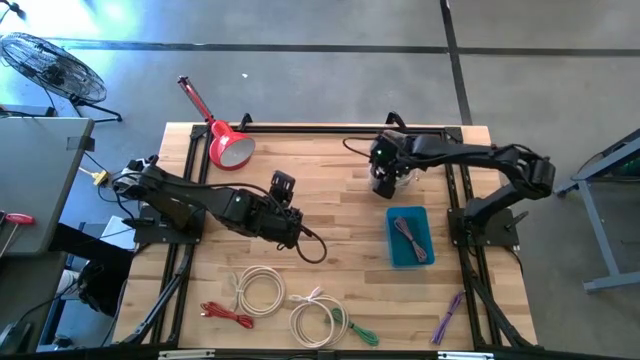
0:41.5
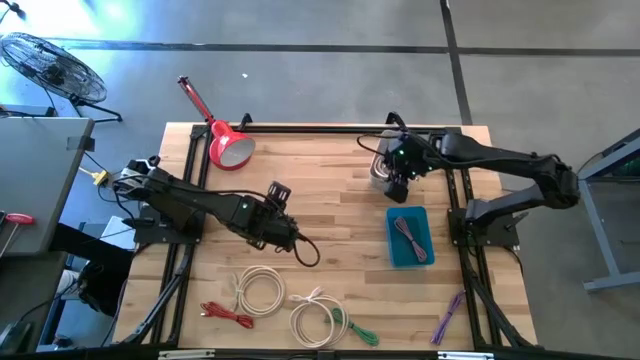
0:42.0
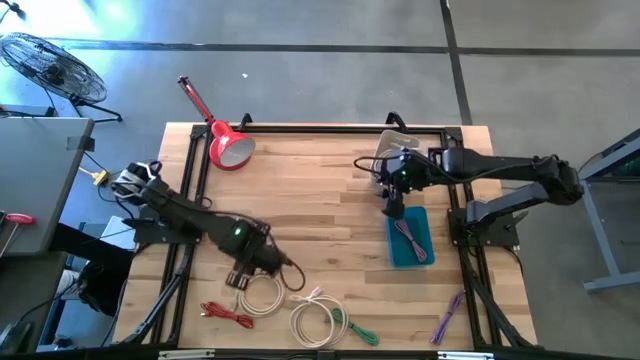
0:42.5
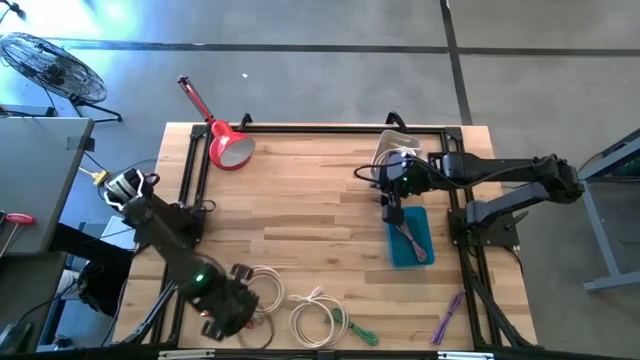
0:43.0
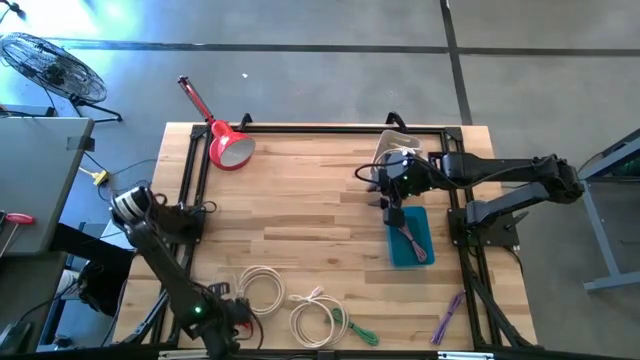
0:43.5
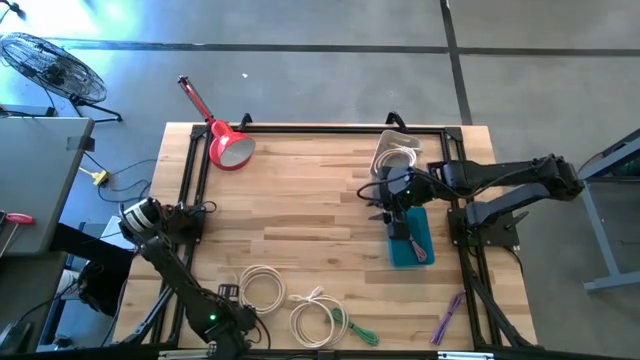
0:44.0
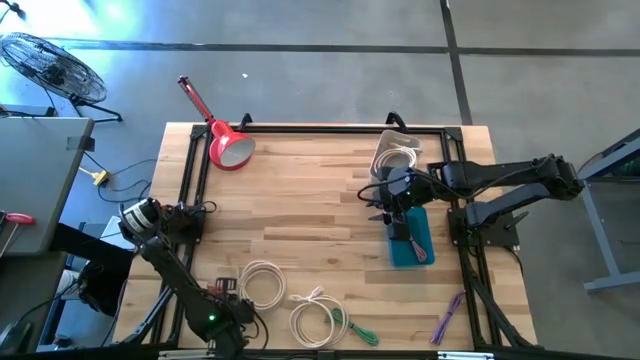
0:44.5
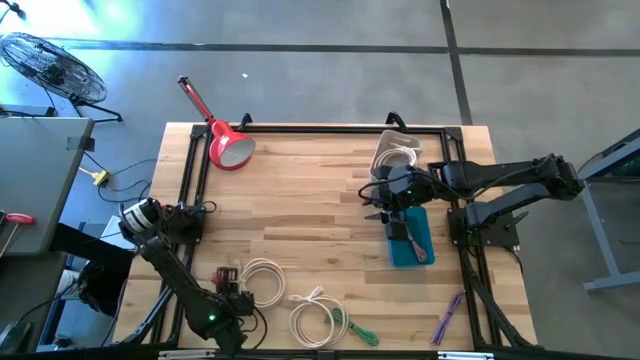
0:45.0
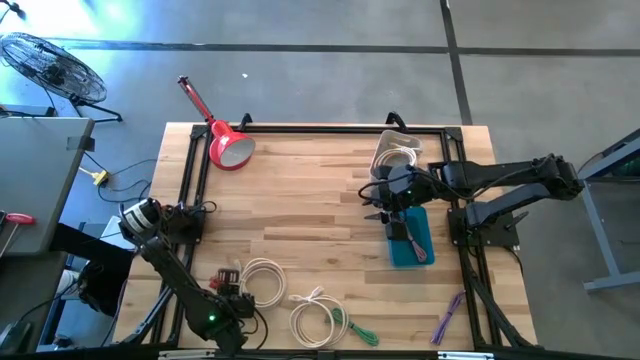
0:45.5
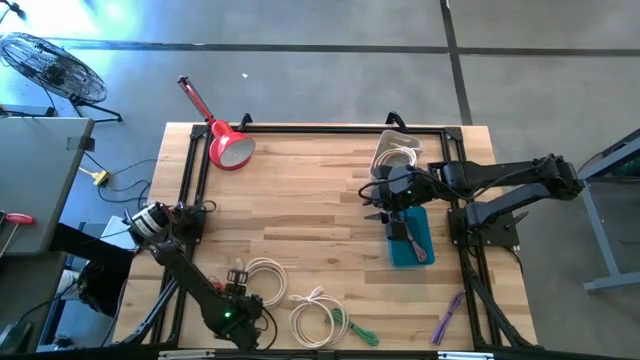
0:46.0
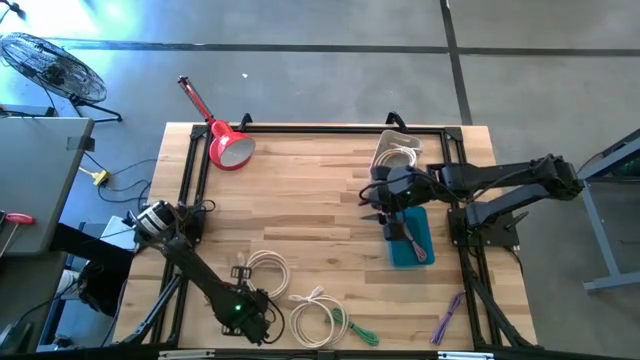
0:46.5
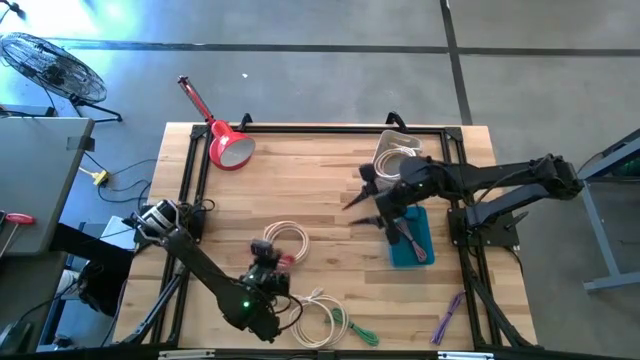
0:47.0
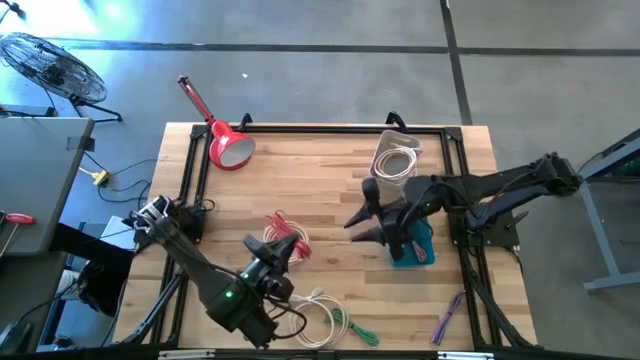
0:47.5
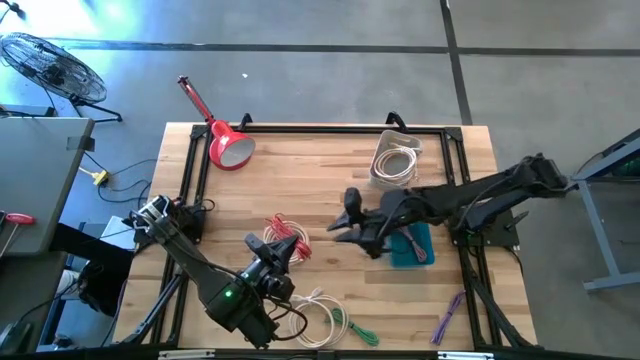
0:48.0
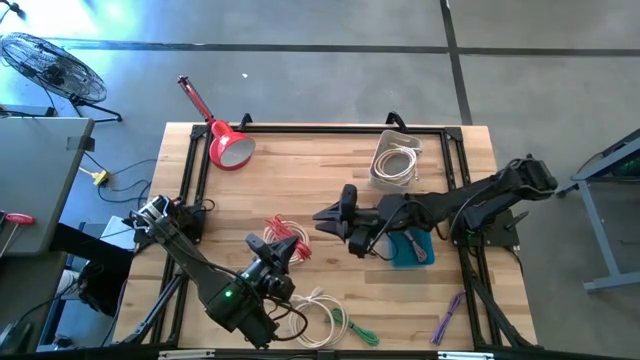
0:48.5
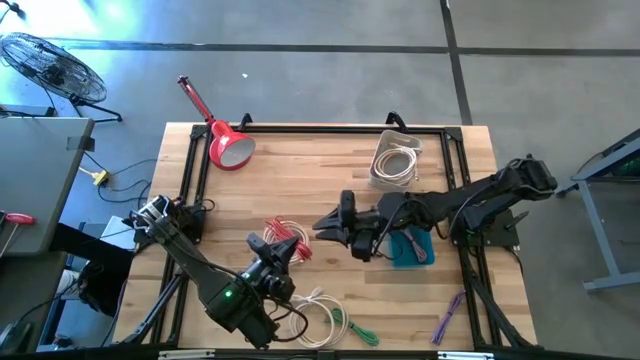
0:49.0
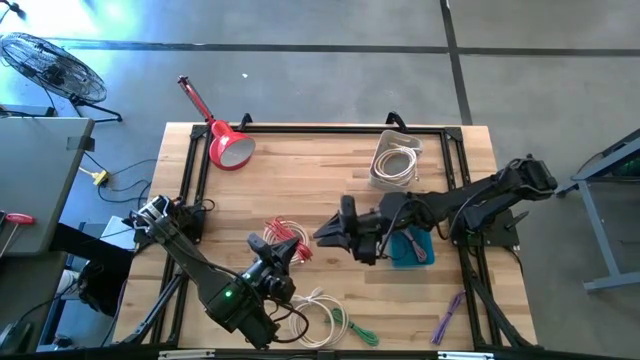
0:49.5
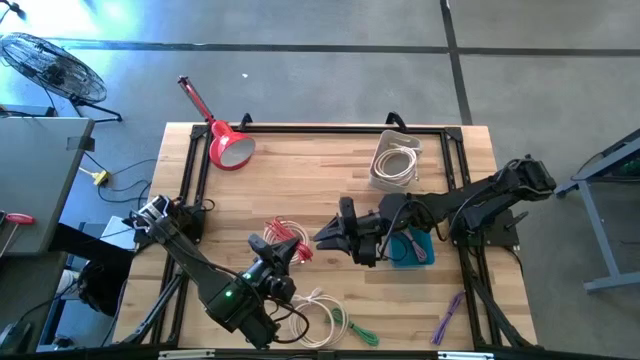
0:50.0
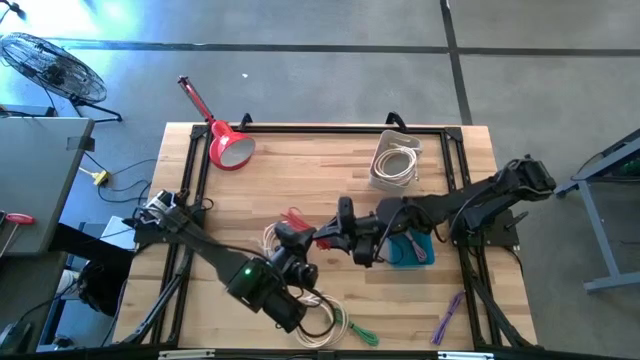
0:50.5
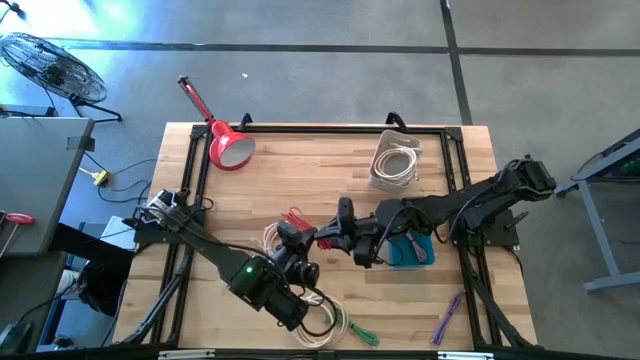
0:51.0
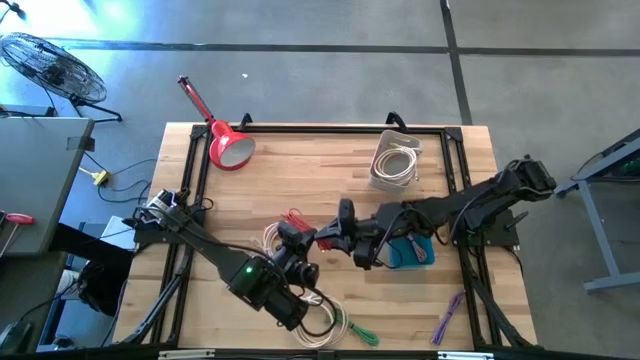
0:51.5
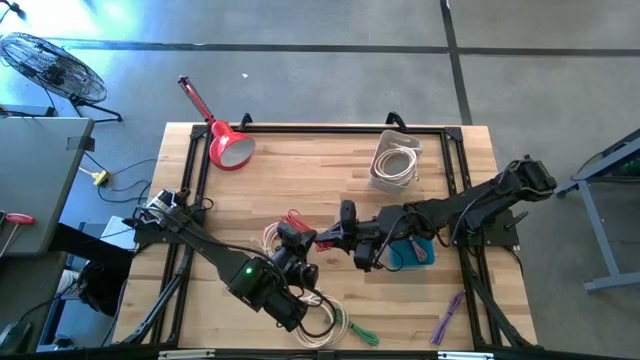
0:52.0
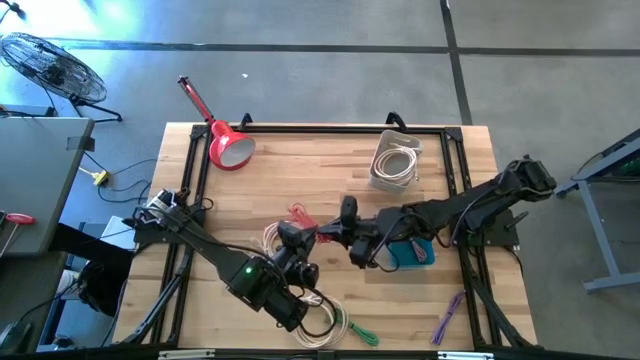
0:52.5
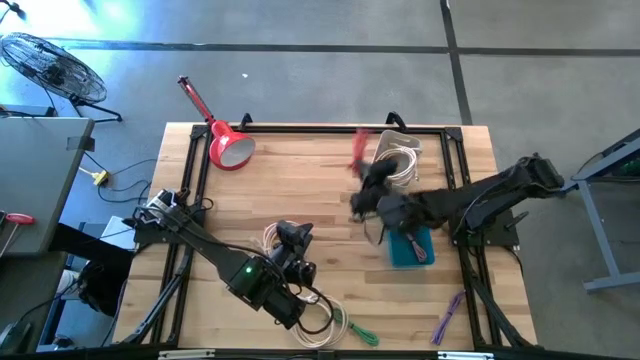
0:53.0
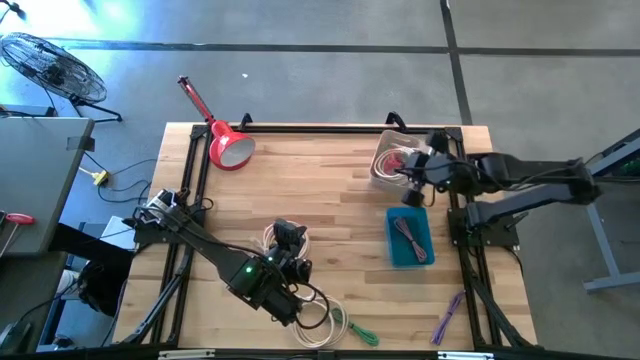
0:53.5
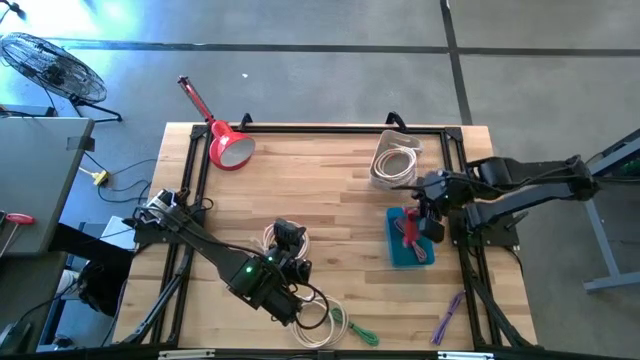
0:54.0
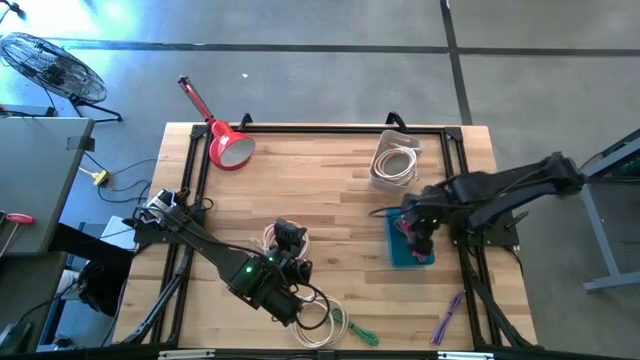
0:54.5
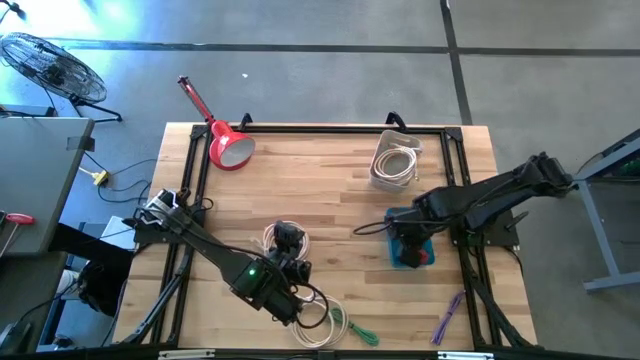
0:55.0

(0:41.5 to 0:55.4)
Task: Pick & Place USB Port
Put the red charger cable into the blue bin

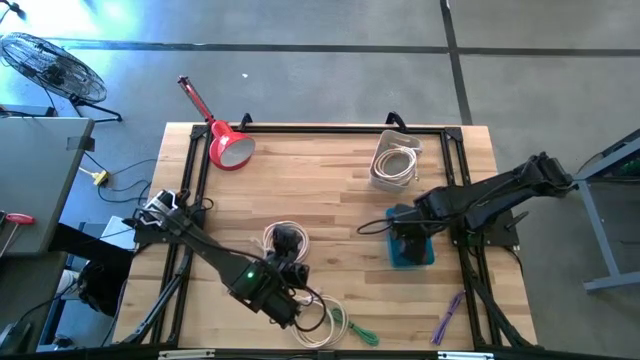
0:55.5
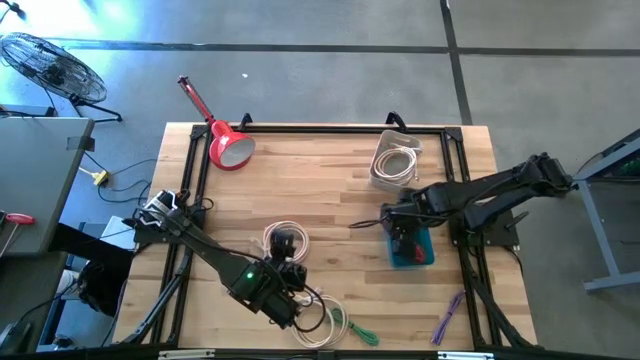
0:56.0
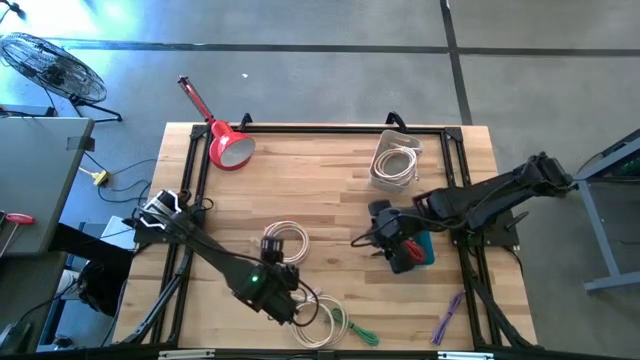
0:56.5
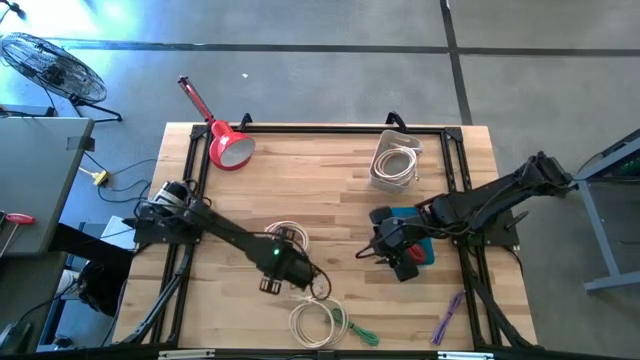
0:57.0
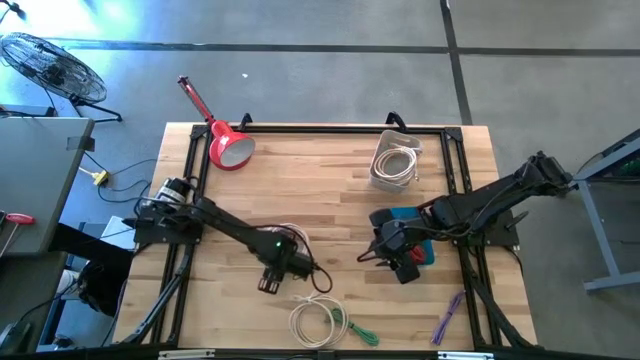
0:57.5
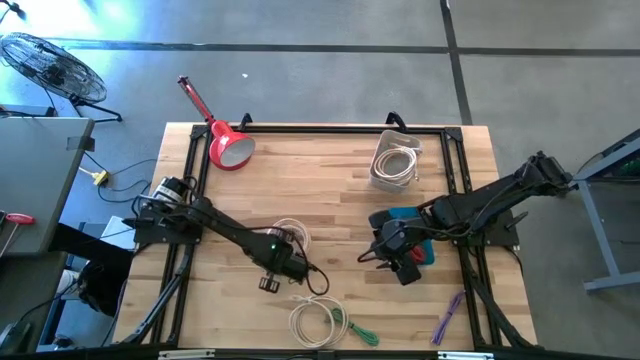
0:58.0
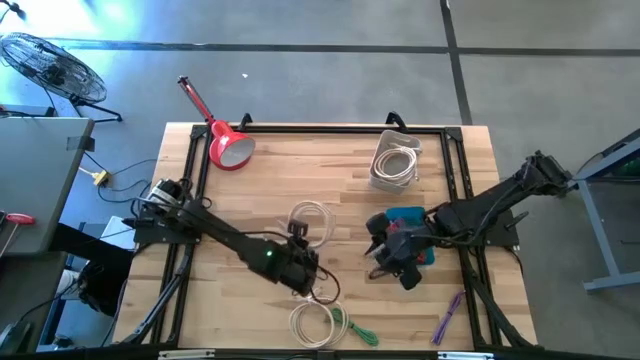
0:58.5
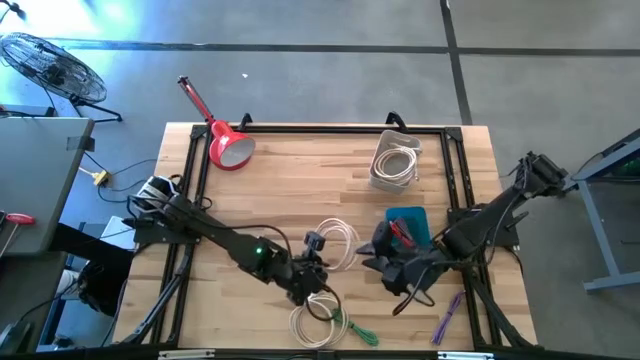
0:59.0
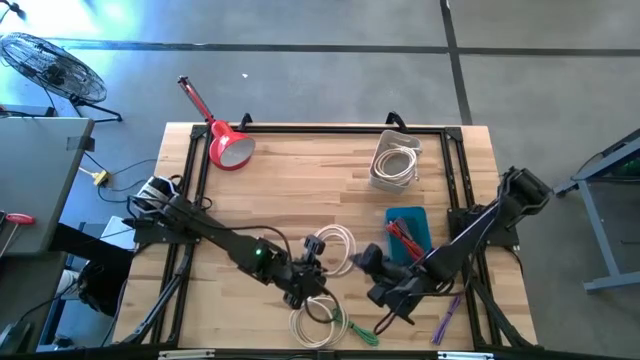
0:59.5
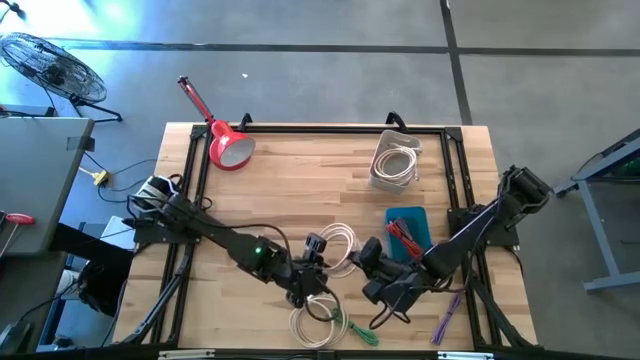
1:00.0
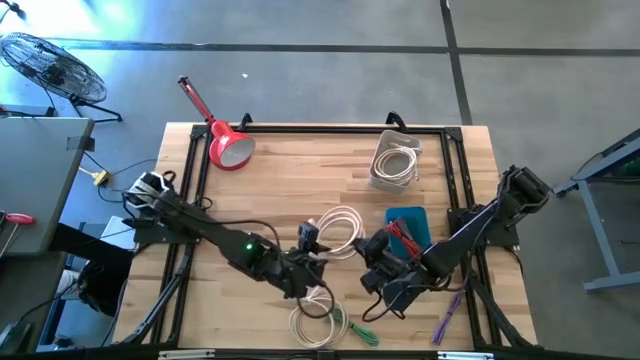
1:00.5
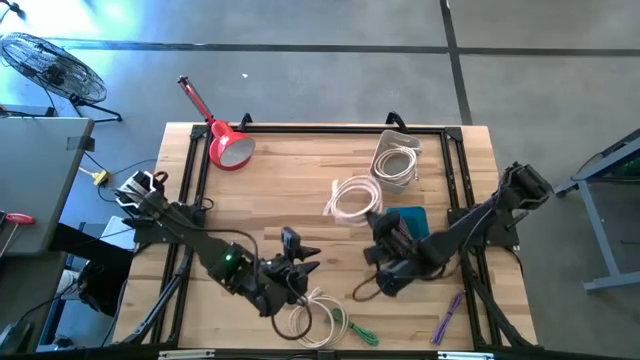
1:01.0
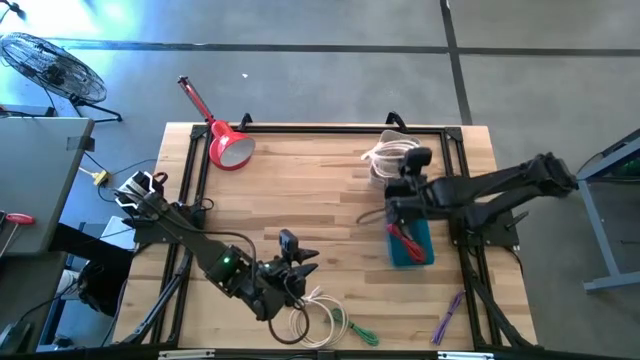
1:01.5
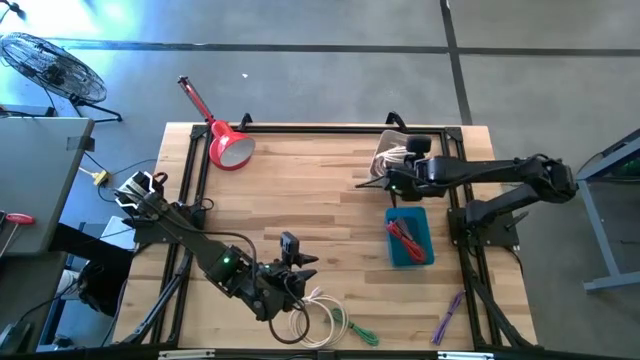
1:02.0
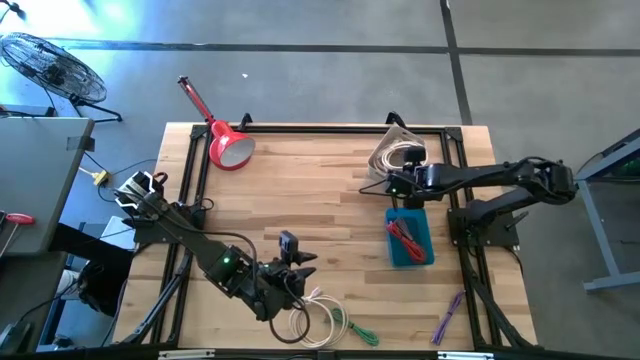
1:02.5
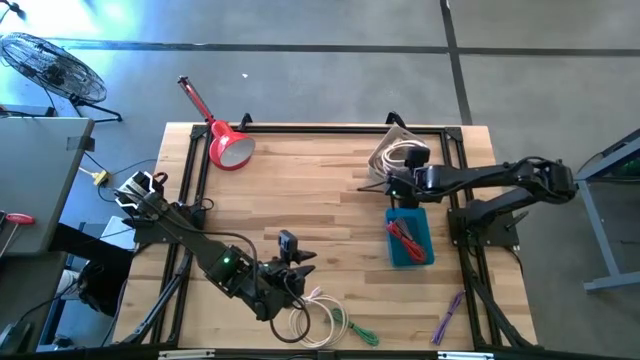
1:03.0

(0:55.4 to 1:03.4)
Put the white HDMI cable into the white bin
